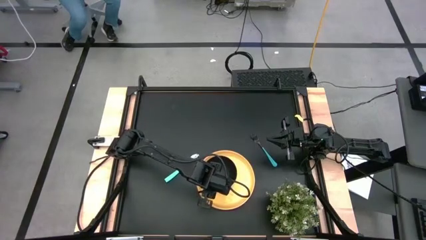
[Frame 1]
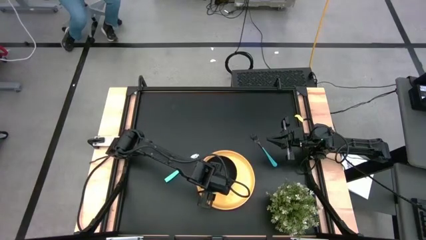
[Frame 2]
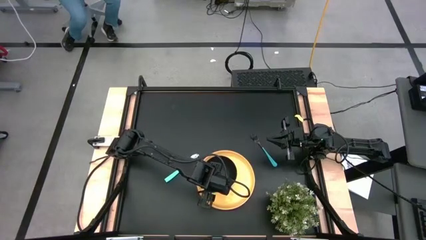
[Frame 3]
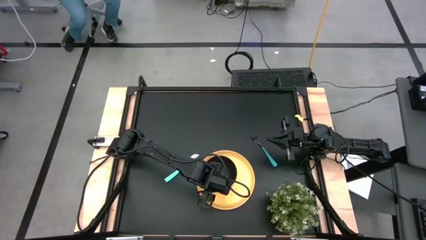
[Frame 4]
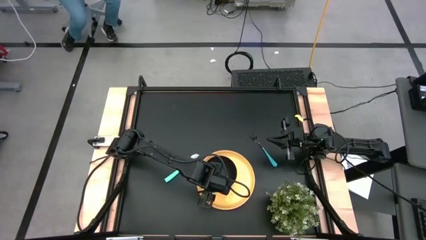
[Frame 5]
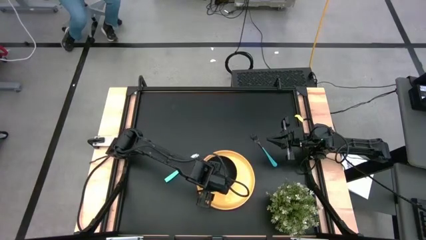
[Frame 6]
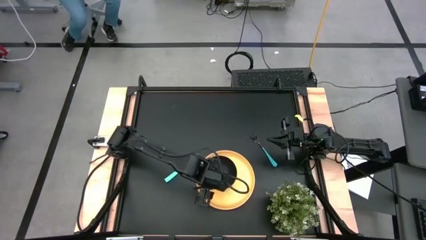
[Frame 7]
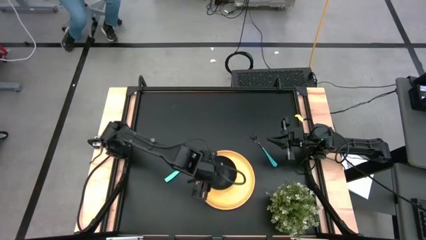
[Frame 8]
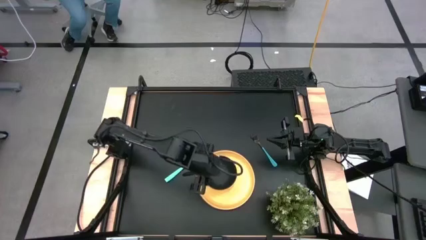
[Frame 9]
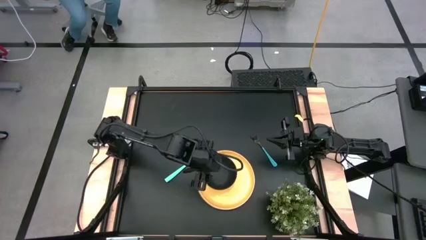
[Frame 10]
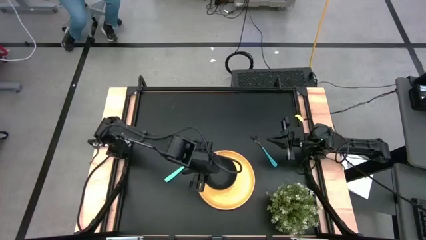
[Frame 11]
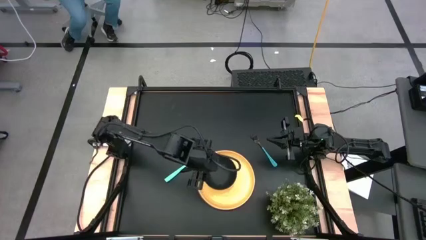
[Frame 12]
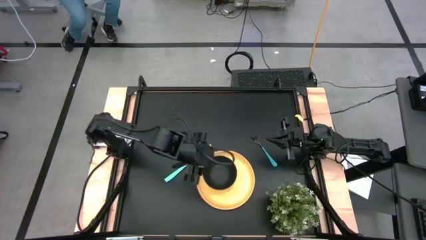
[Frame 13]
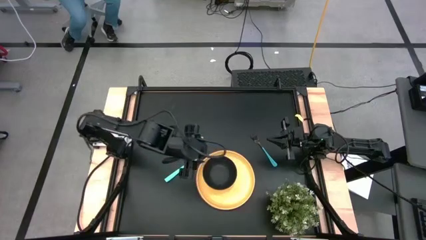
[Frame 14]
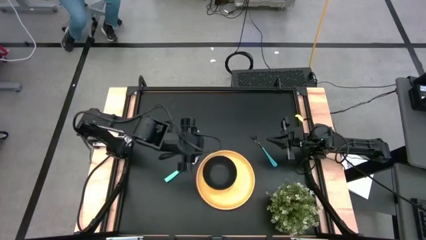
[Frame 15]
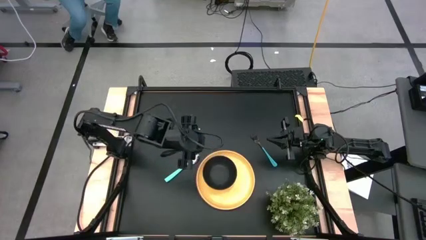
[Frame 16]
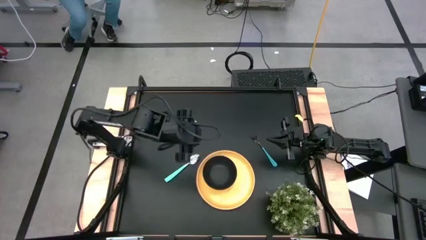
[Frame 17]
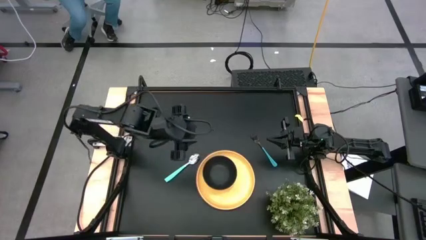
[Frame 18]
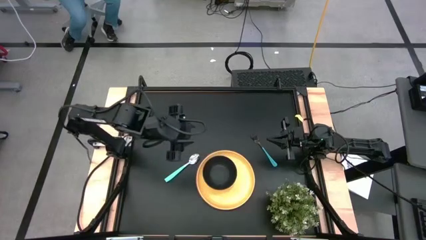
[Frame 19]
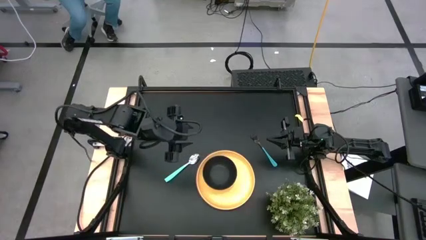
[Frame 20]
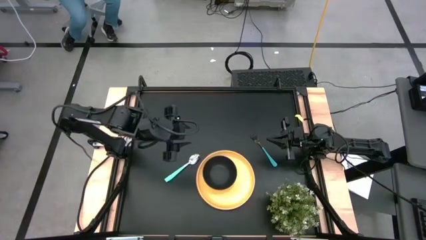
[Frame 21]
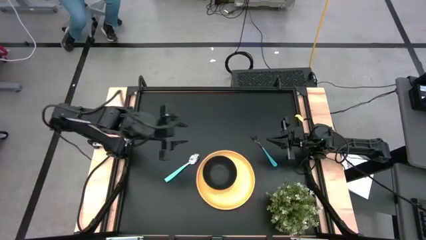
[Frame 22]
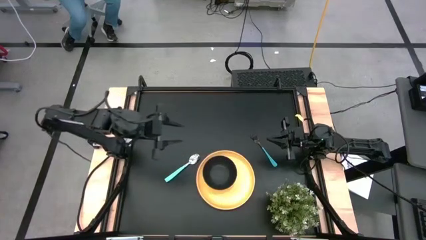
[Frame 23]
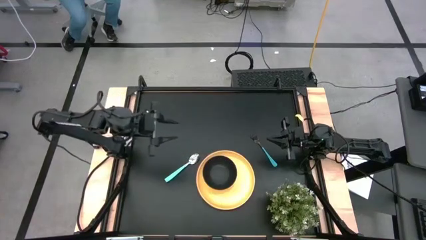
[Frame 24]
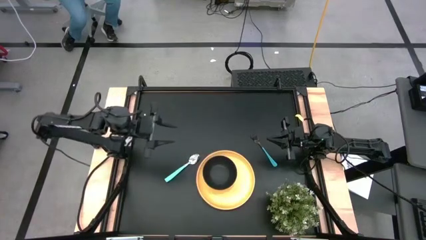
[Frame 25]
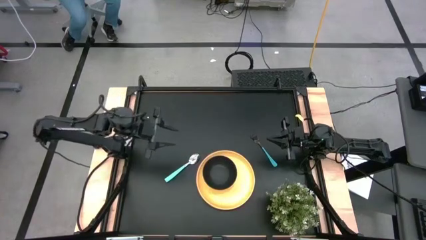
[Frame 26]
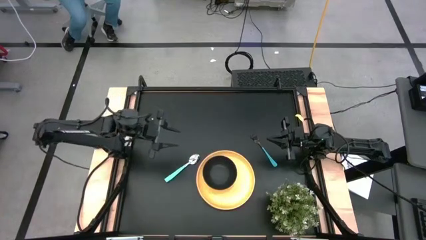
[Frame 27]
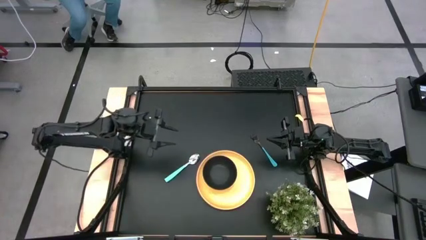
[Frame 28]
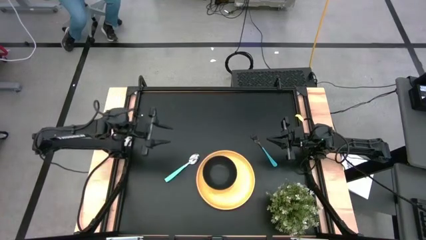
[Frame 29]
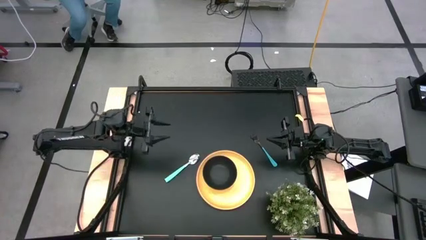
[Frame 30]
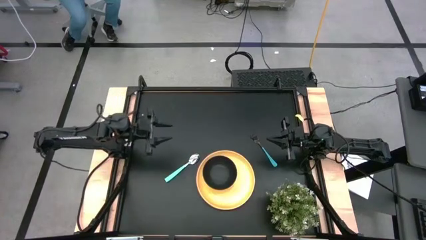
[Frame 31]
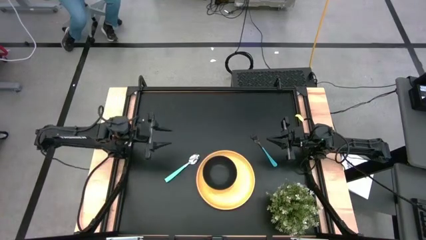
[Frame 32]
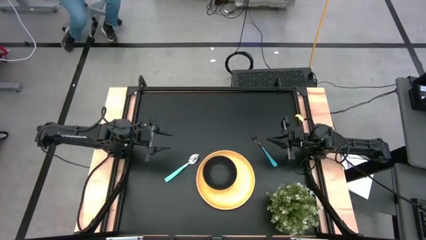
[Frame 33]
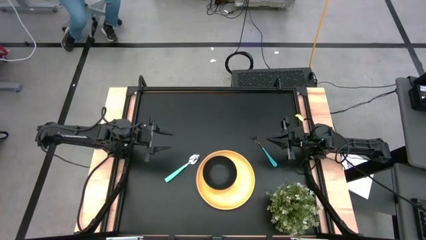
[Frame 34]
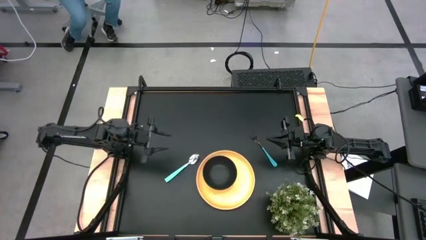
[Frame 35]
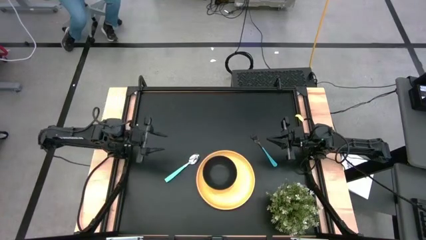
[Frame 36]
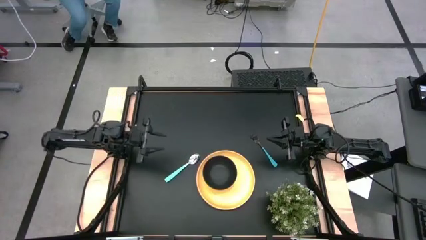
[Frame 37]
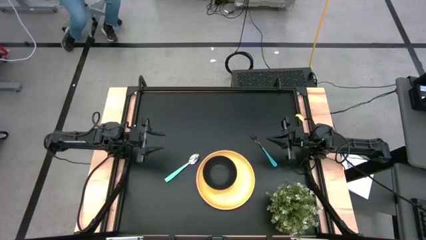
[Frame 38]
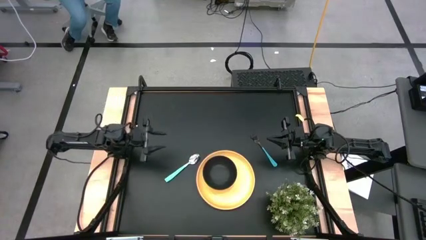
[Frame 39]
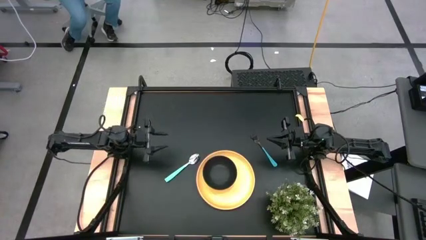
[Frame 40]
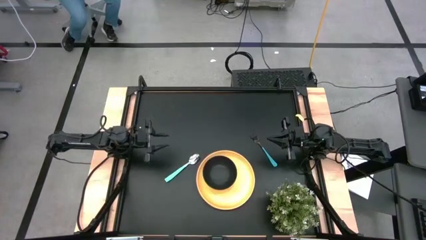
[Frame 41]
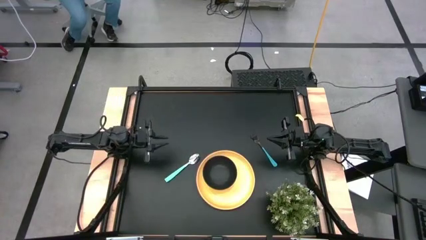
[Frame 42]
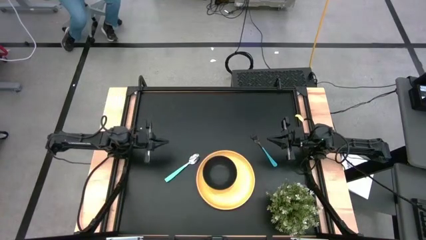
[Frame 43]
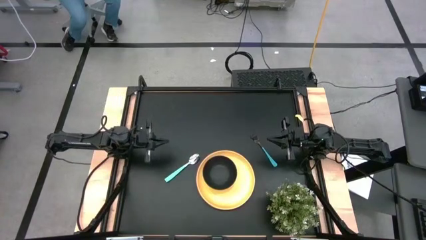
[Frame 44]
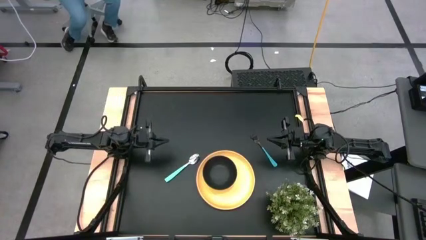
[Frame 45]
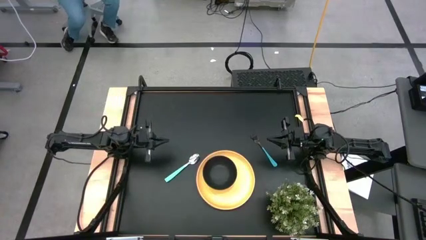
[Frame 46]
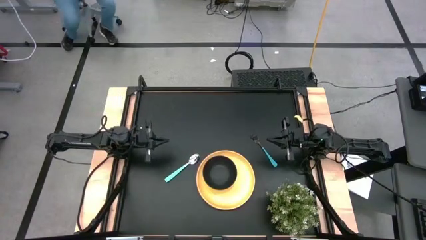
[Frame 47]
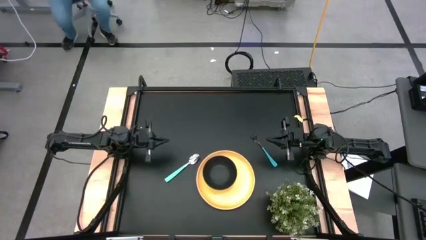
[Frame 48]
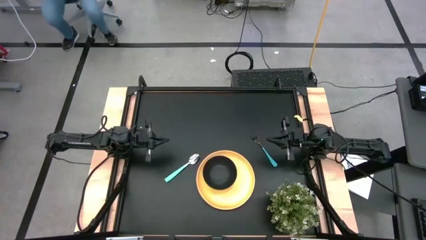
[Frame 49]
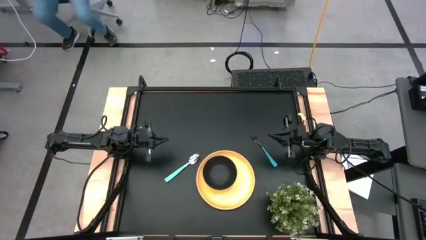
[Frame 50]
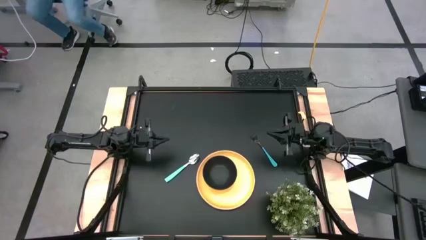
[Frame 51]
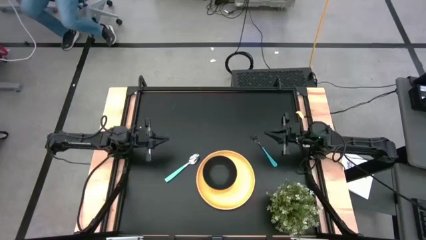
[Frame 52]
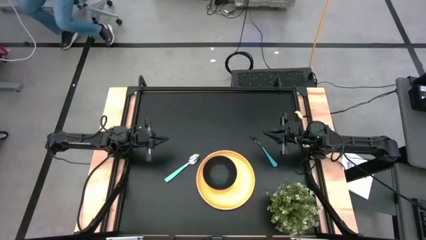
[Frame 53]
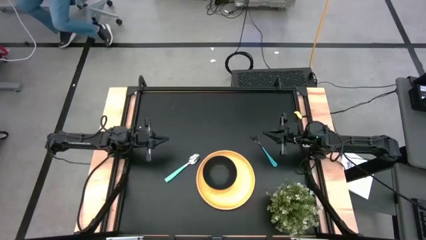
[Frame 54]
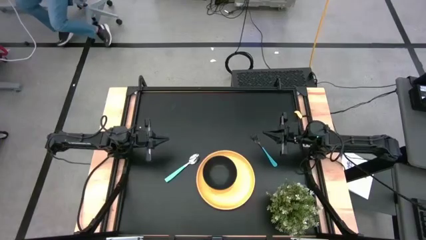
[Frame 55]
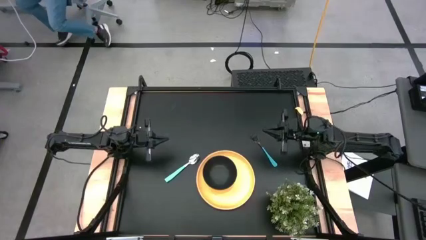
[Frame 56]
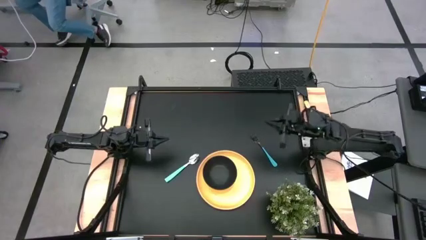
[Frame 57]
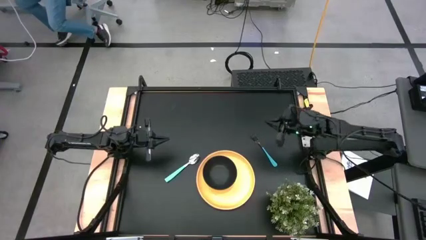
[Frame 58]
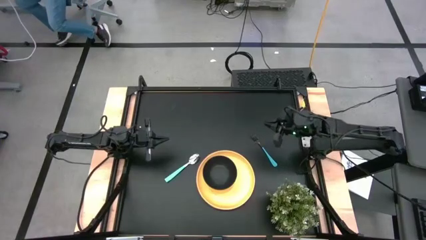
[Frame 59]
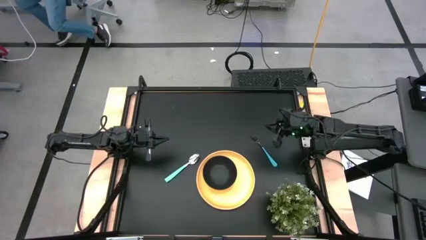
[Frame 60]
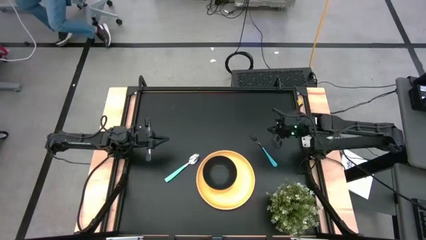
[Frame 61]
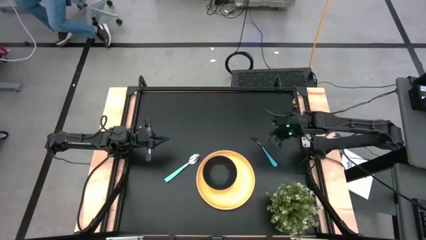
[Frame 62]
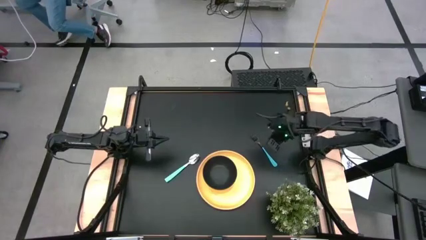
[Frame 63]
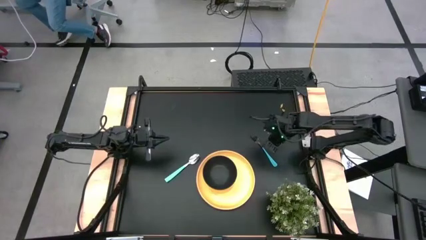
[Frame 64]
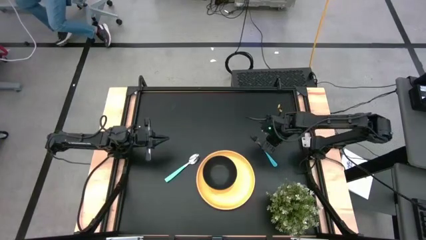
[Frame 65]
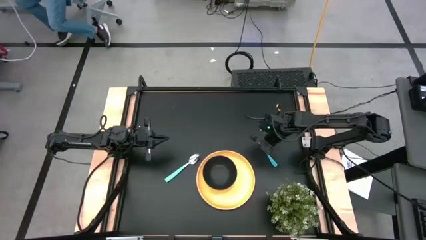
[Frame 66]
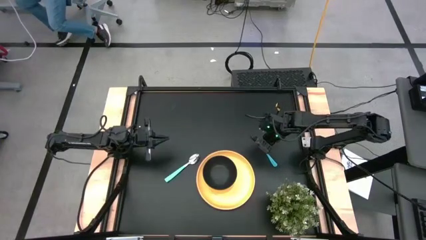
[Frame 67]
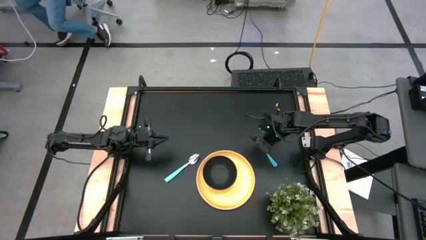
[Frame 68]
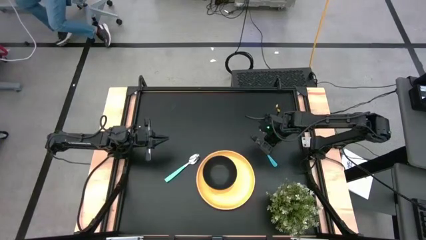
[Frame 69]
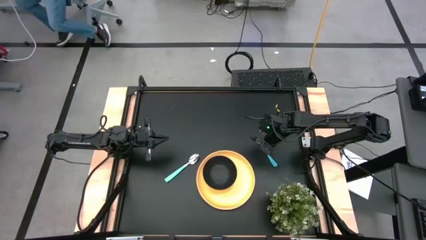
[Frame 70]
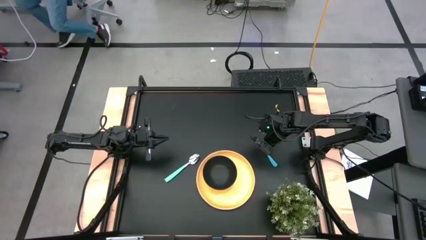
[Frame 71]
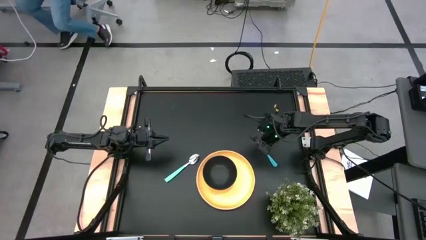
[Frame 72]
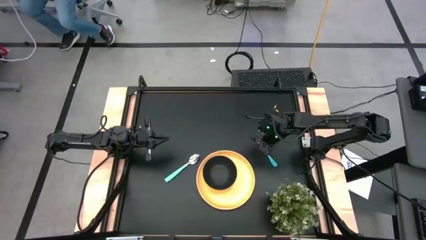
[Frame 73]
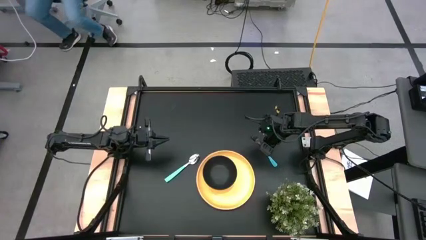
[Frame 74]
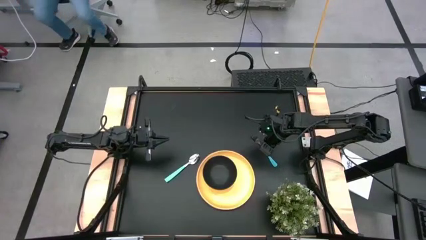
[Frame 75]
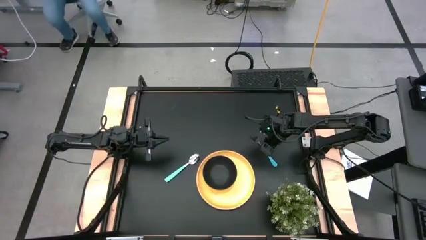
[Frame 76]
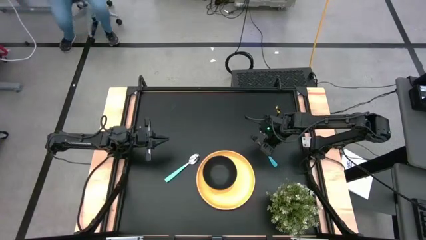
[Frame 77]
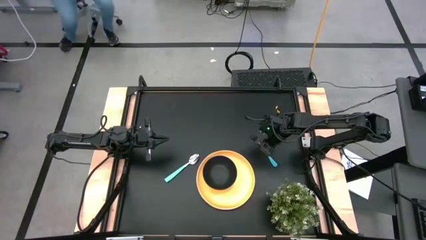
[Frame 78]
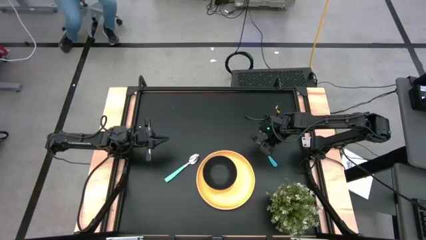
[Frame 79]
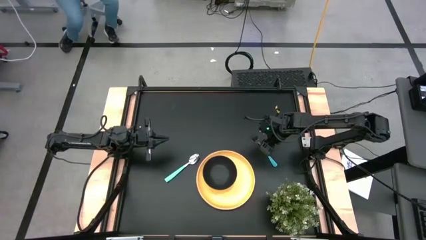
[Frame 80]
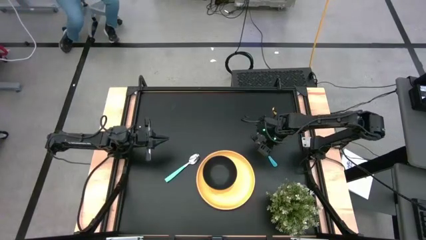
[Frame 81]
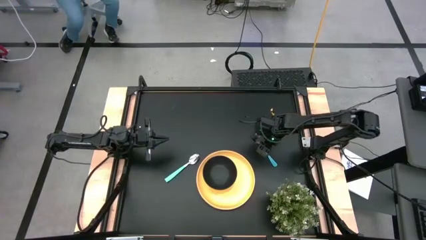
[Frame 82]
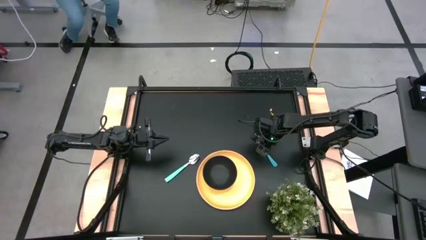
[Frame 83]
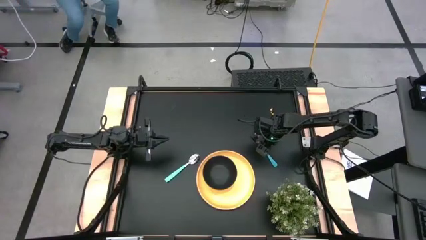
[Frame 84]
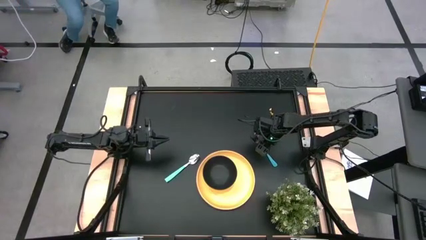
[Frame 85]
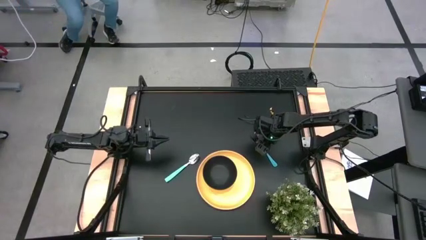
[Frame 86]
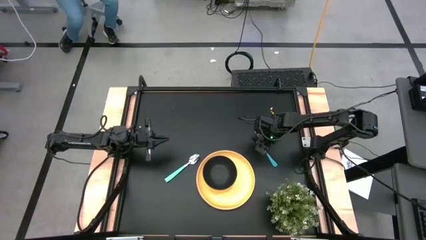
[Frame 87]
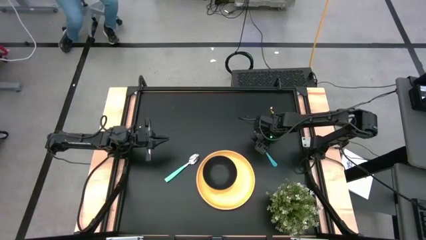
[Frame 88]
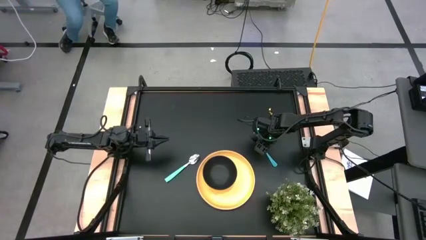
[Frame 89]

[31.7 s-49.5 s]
Task: Pick and place plate/cup/fork/spoon on tray
Put the blue fork on the yellow plate beside the black bowl
